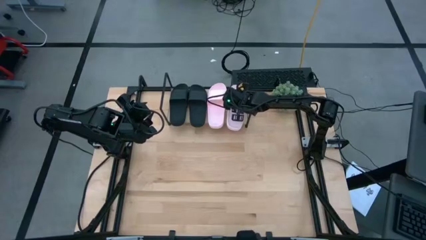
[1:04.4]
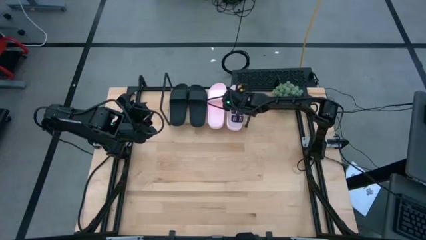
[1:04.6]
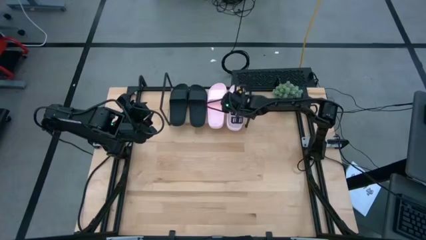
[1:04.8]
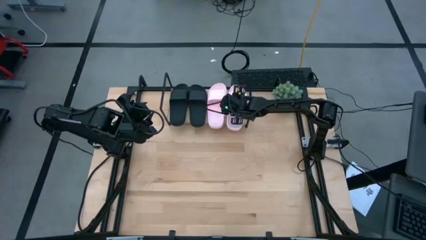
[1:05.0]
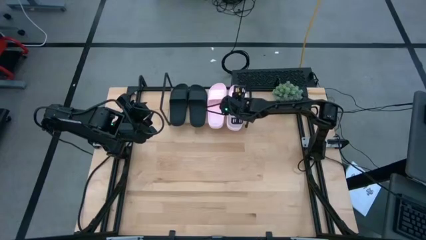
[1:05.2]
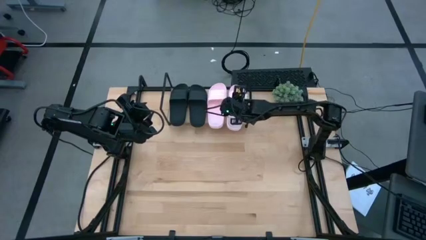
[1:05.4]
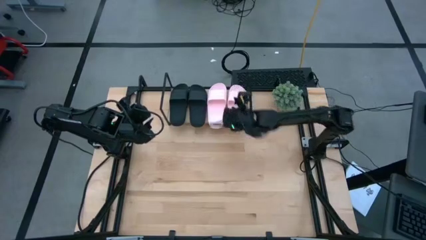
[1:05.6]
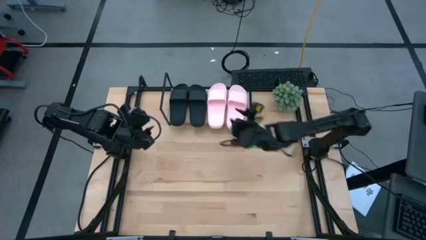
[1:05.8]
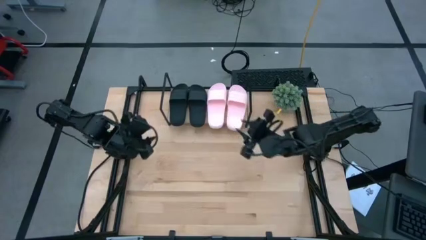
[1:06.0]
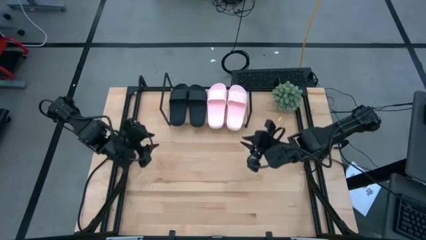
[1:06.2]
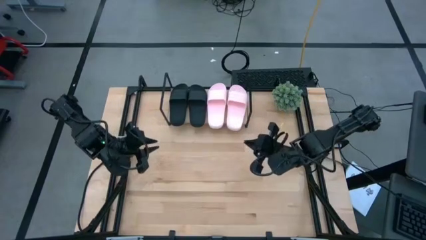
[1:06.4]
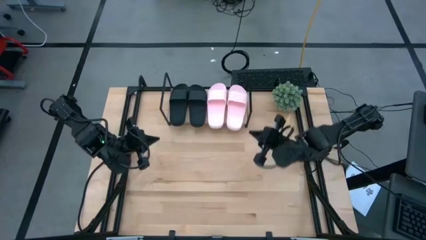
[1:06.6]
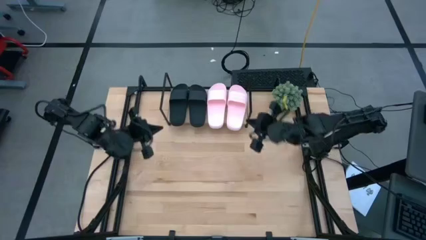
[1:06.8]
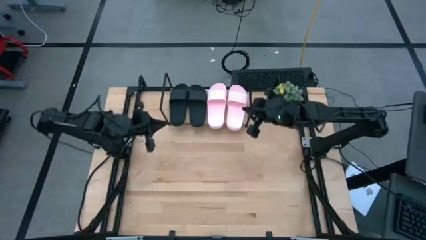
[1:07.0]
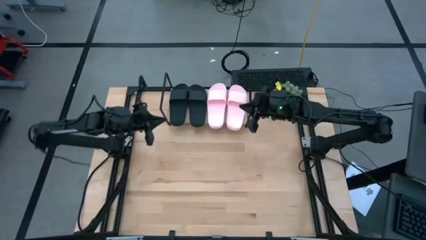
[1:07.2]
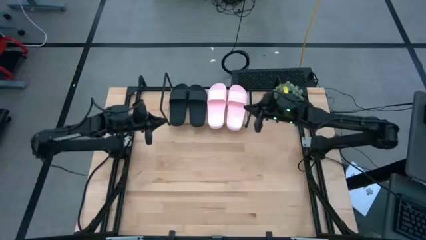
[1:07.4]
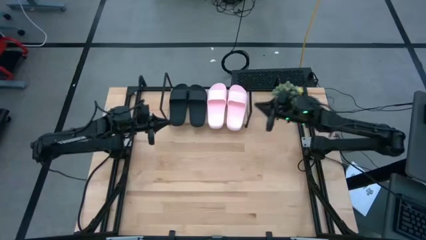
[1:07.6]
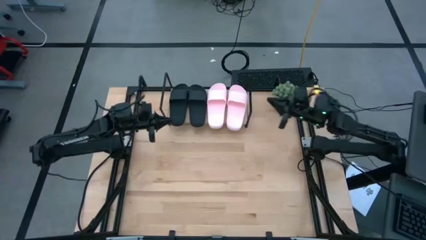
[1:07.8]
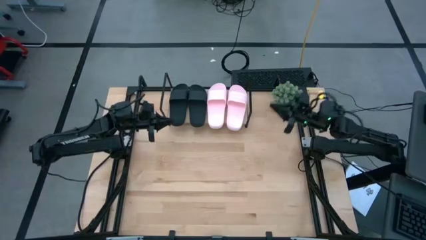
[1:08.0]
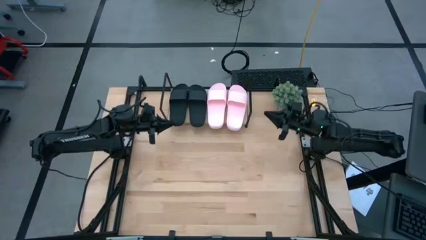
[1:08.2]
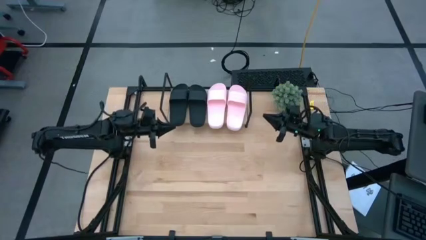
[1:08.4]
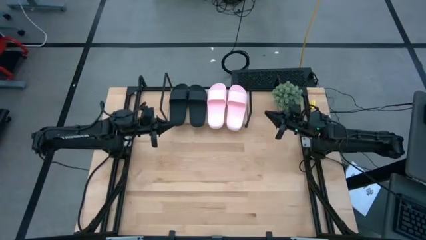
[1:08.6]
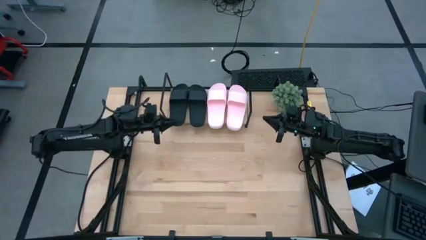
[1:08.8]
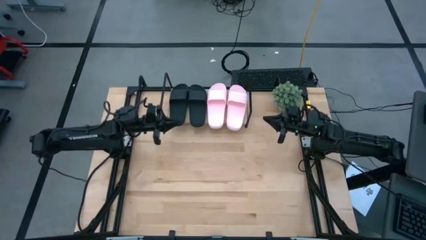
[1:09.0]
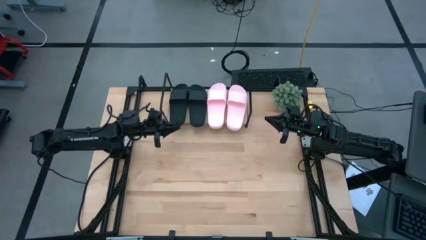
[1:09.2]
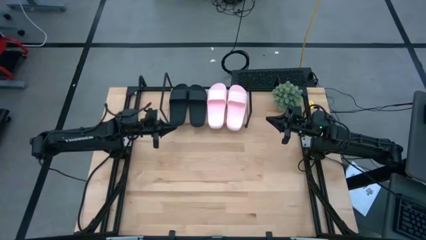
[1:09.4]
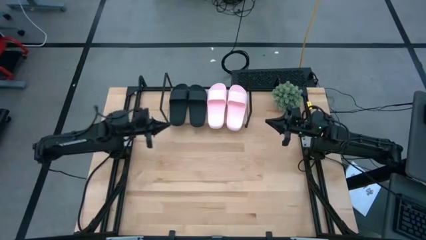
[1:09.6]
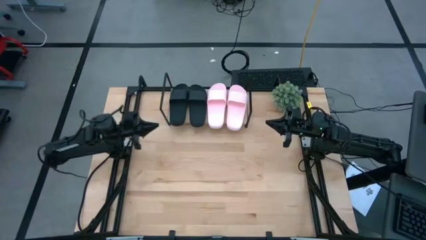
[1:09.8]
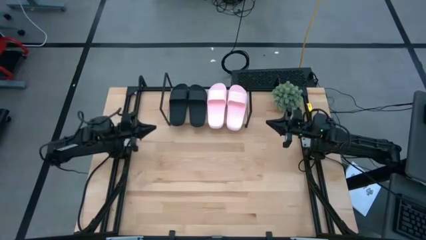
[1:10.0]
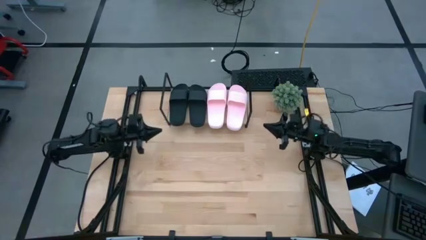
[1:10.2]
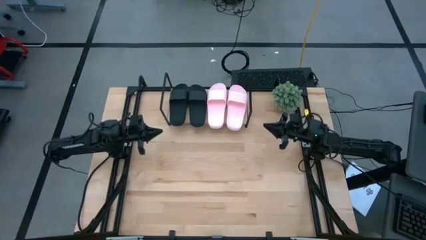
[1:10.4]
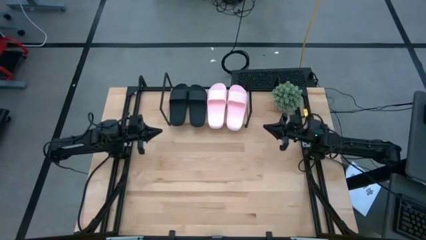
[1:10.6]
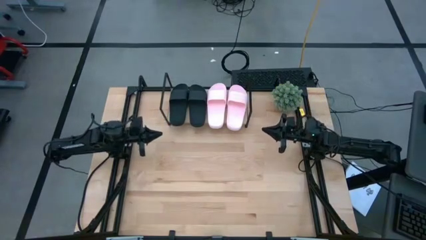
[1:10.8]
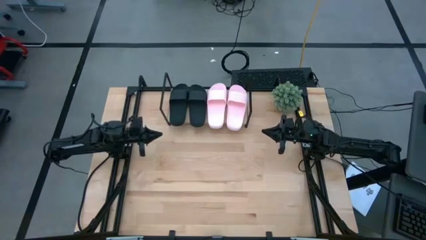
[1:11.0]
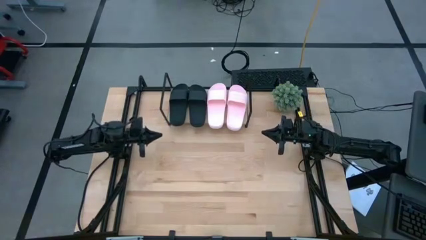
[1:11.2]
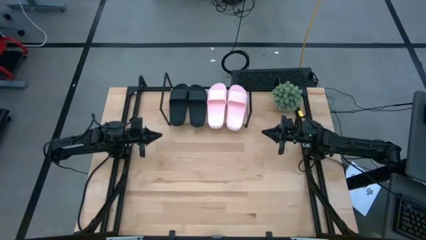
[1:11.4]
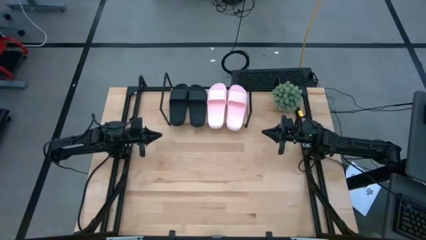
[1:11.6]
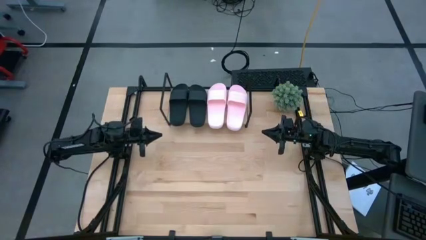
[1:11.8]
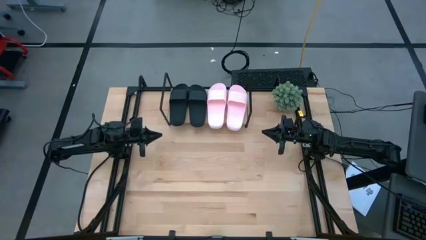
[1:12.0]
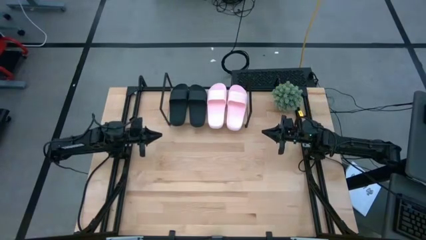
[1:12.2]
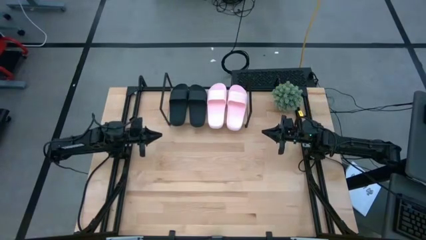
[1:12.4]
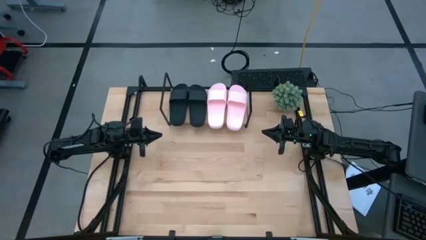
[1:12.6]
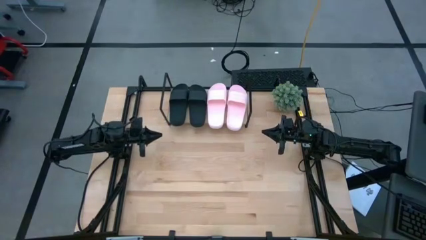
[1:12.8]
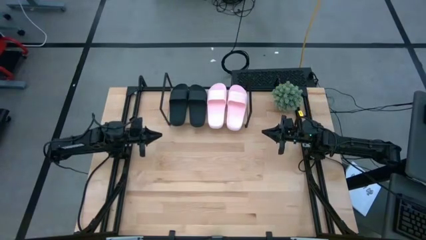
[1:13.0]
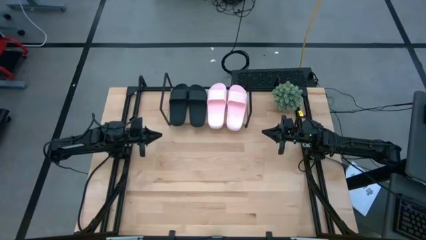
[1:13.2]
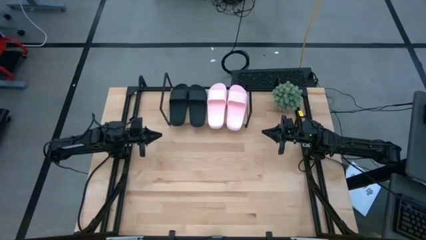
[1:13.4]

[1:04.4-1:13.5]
Task: Pick and place slides into the shelf
Return to Home Position

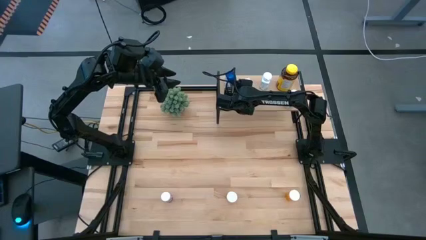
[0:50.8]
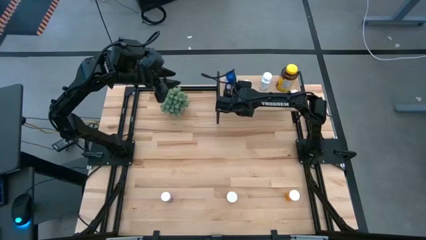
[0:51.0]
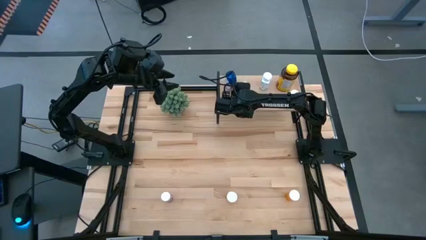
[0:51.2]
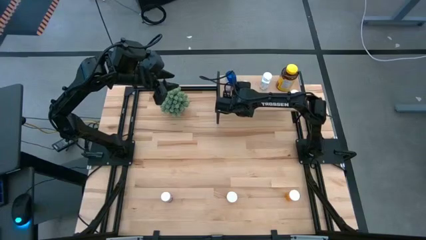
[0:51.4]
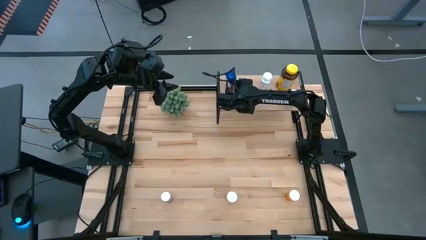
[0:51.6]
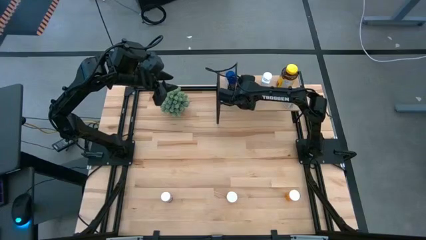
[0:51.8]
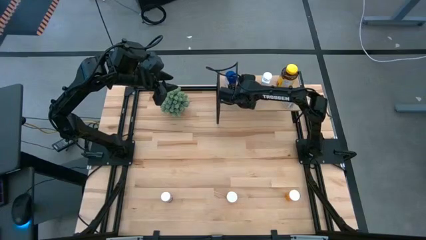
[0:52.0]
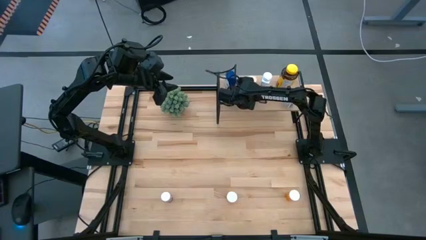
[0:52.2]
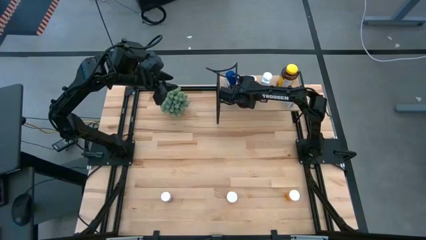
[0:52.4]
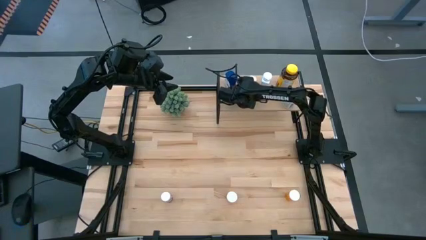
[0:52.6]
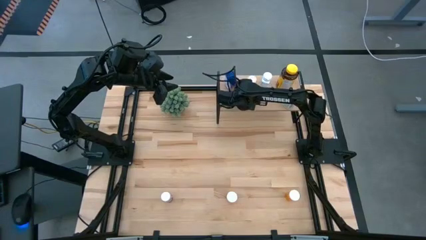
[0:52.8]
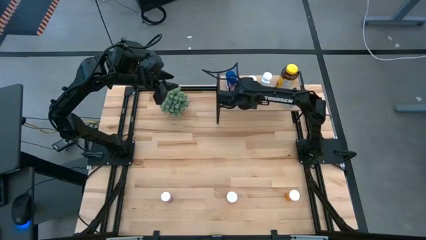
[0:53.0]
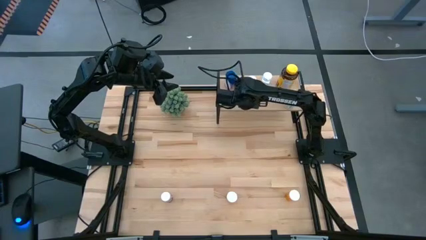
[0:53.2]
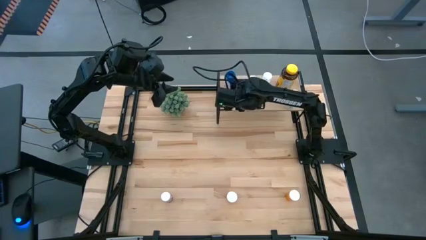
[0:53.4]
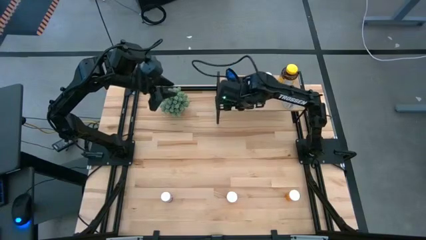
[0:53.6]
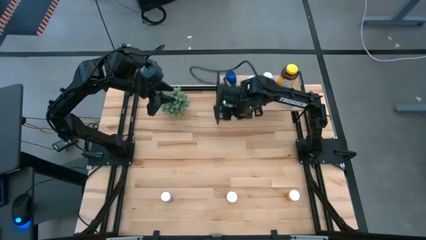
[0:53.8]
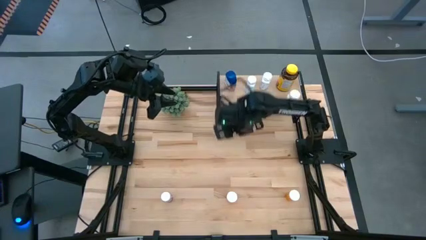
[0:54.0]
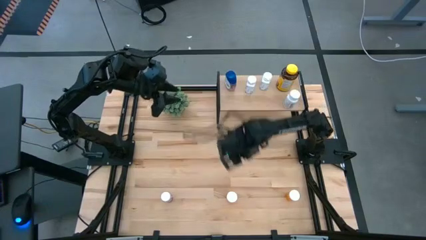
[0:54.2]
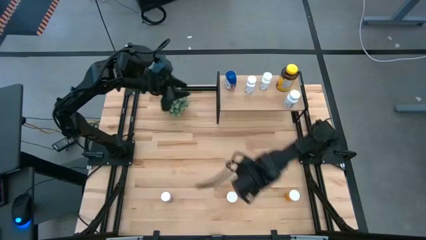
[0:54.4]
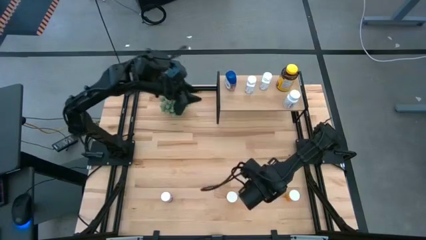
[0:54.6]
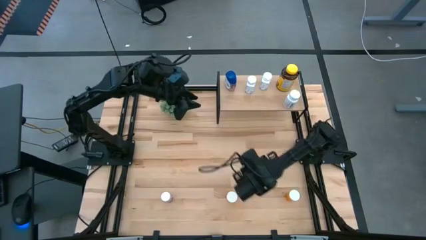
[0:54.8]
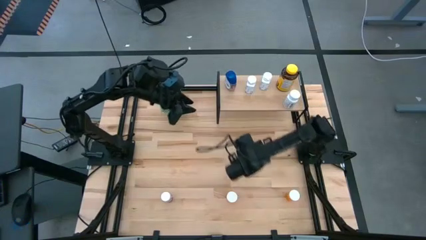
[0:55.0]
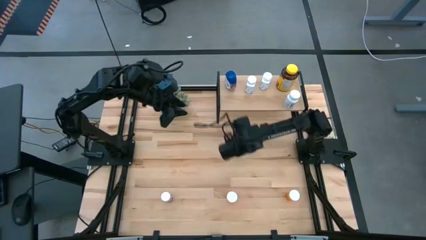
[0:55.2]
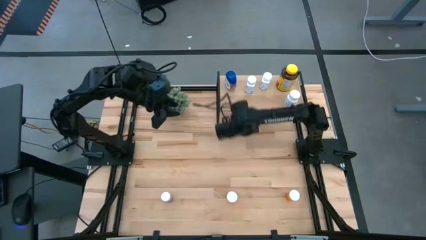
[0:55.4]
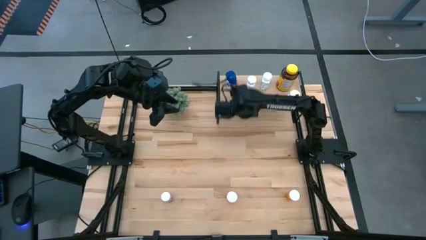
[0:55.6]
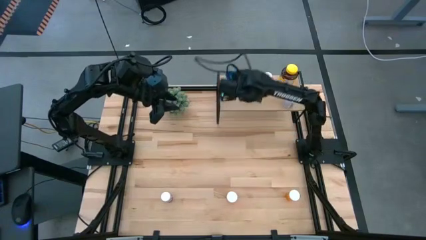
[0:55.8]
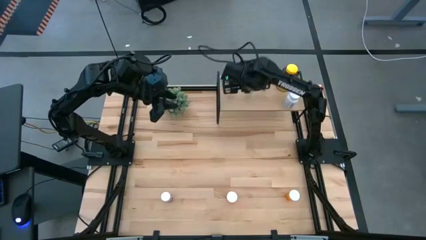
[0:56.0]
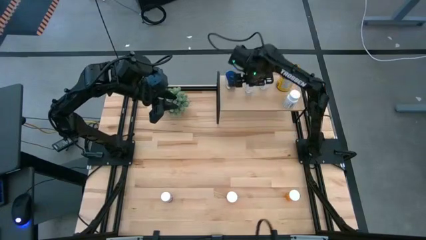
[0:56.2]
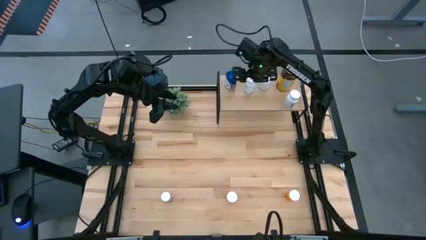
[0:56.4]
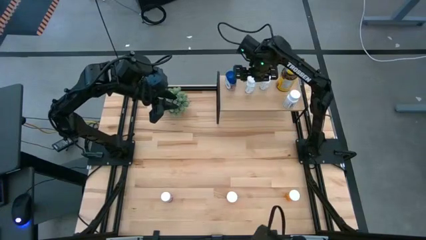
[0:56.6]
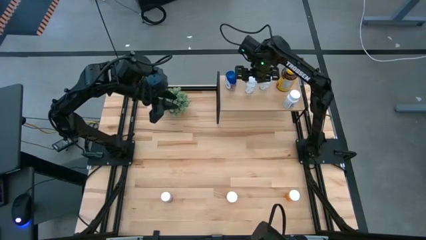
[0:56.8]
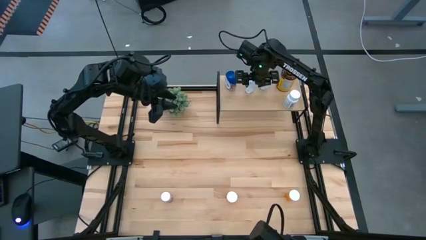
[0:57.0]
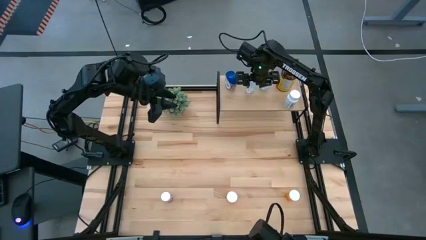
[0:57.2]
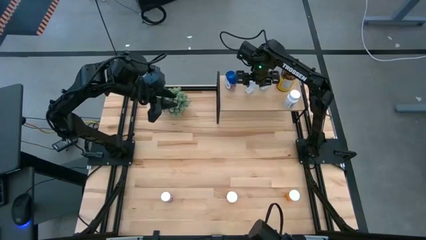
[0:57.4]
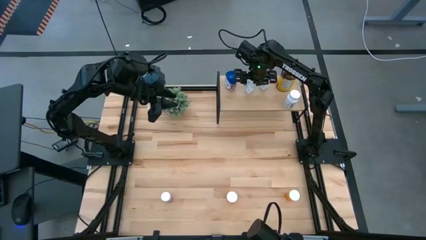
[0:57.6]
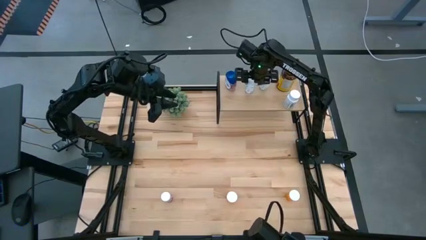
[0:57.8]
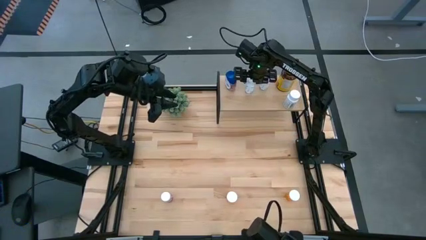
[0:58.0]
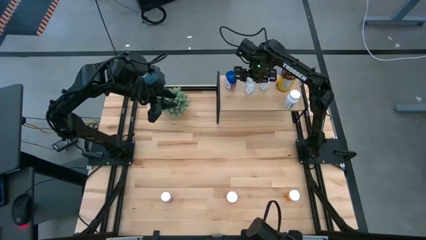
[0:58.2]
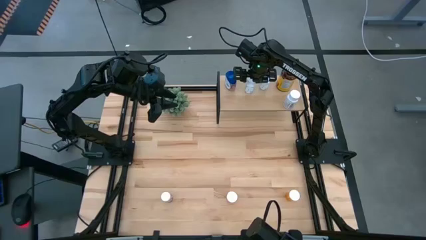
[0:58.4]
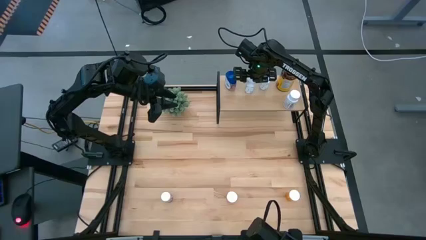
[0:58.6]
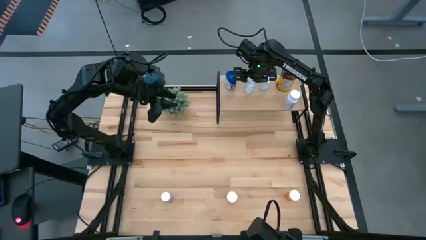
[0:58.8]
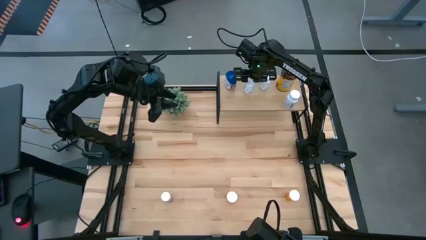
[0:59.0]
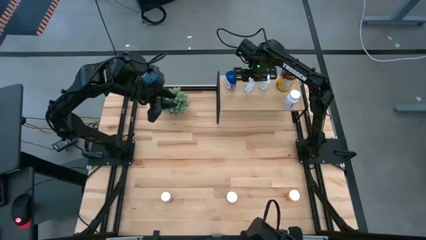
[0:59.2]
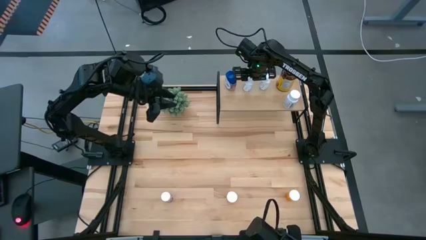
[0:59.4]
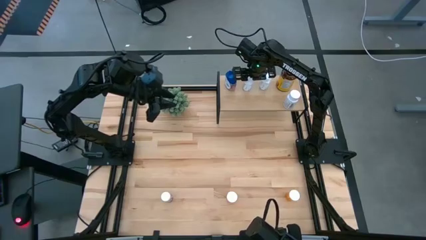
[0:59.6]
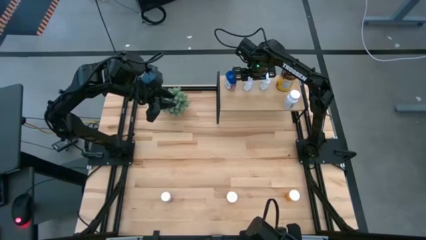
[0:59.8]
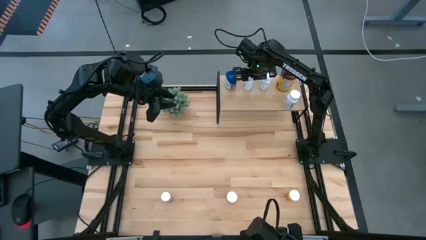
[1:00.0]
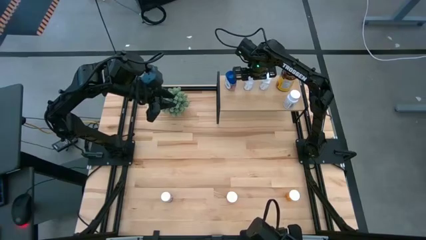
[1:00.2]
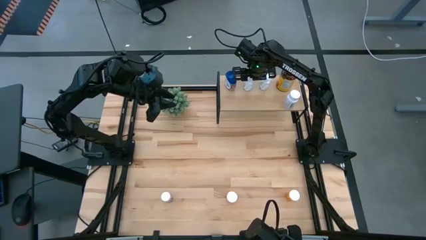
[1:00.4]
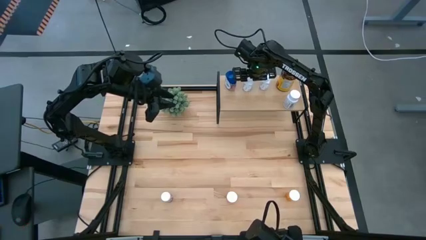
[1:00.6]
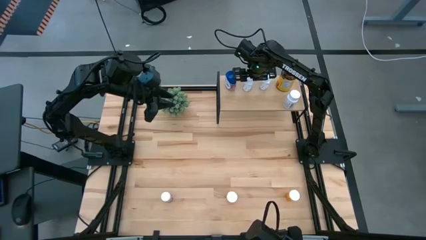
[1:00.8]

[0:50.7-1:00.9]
Task: Pick and place medicine bottles onto shelf by color
Put the white and blue medicine bottle on the shelf
